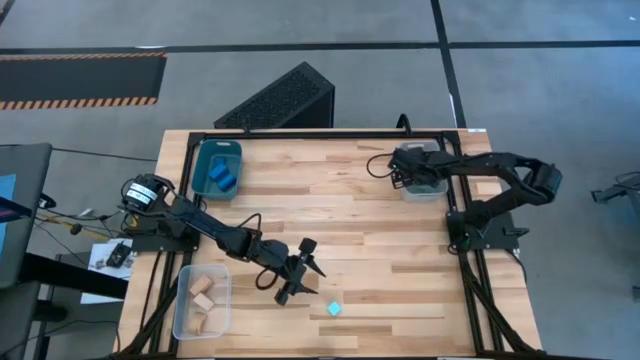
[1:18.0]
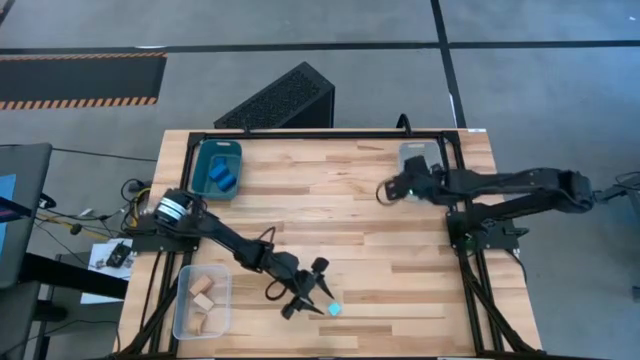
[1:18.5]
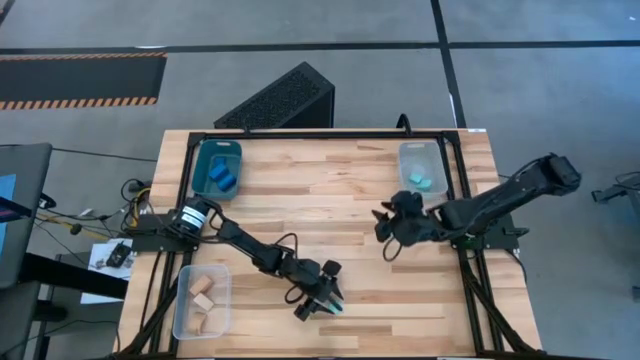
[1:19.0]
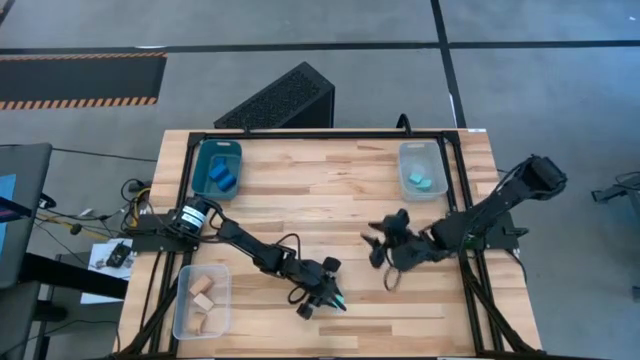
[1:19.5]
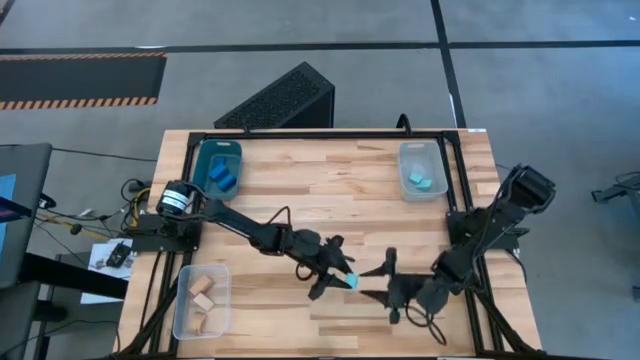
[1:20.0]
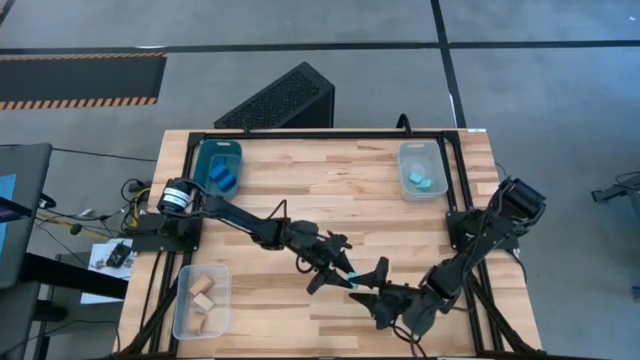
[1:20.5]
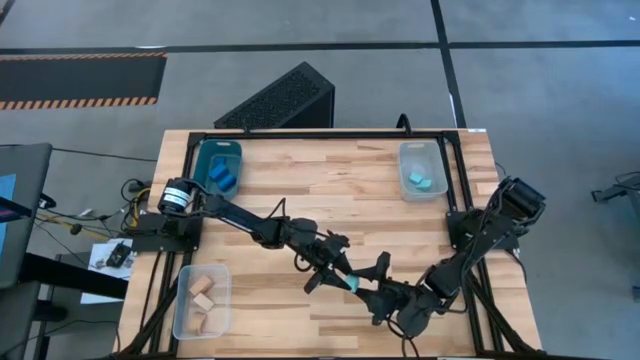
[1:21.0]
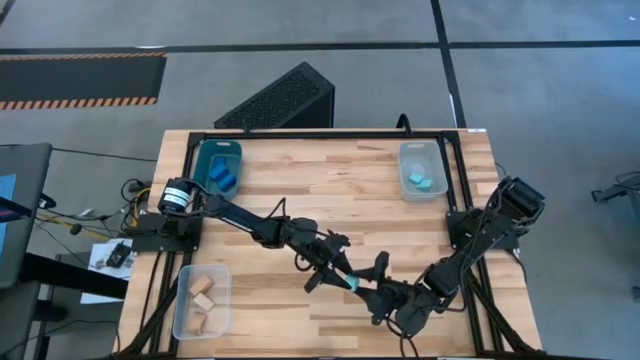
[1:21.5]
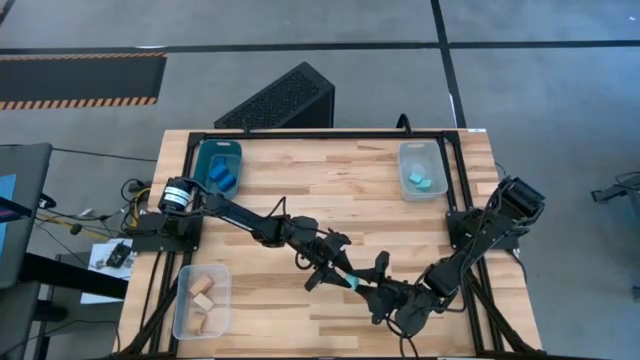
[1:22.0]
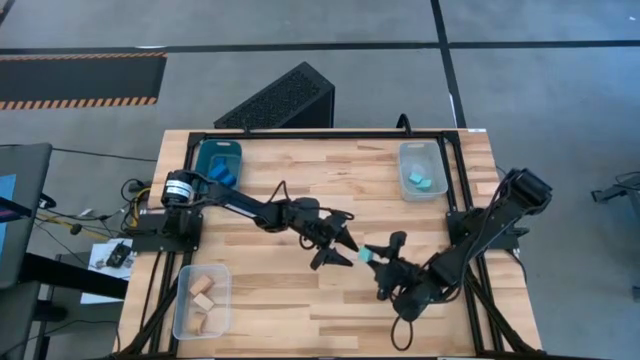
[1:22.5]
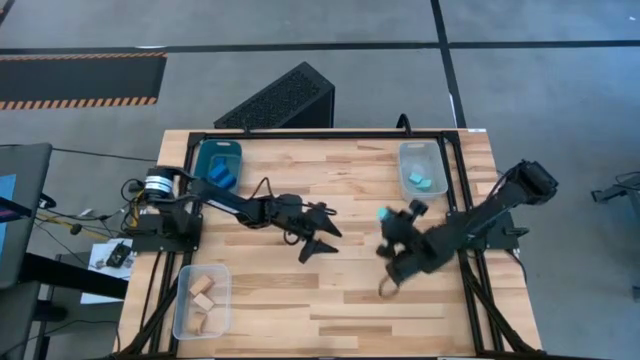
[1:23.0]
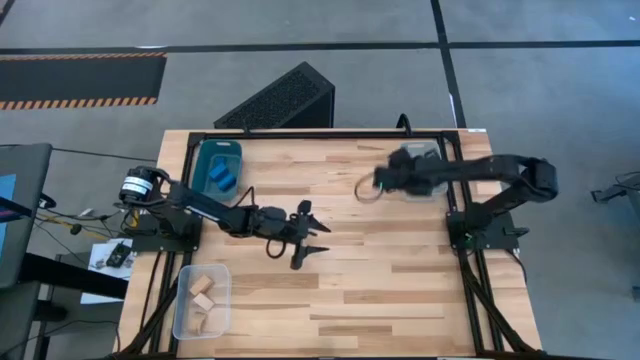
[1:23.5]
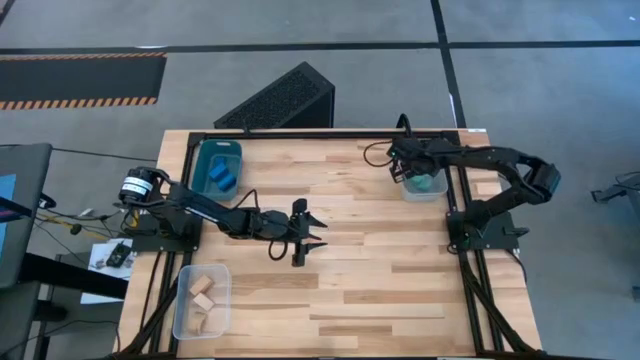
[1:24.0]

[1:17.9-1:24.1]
Task: Sort & place blocks by color
Put the light blue block into the white bin

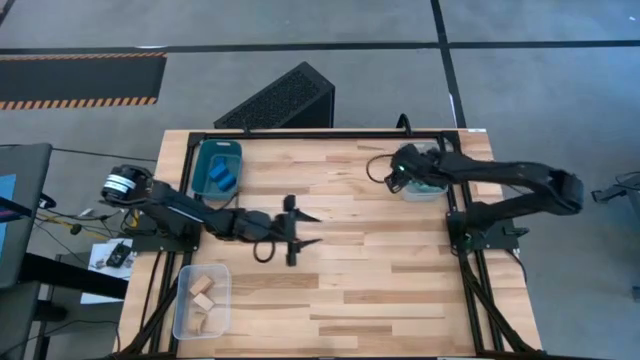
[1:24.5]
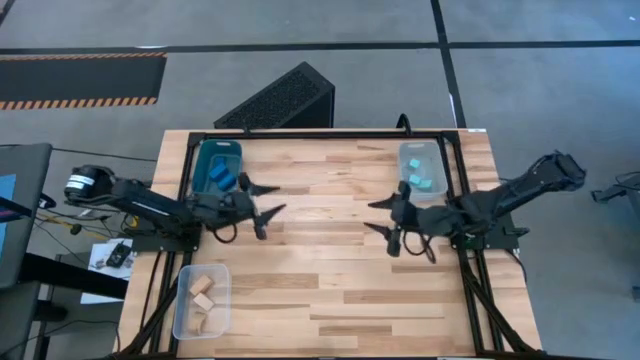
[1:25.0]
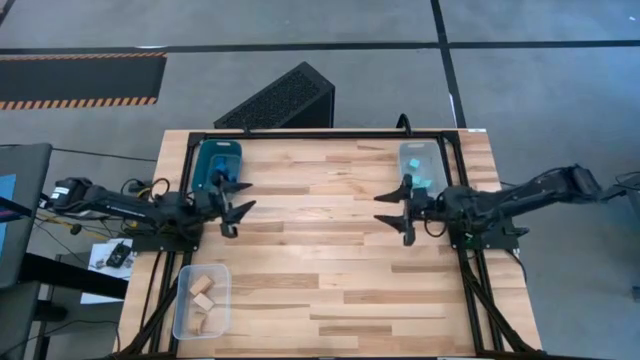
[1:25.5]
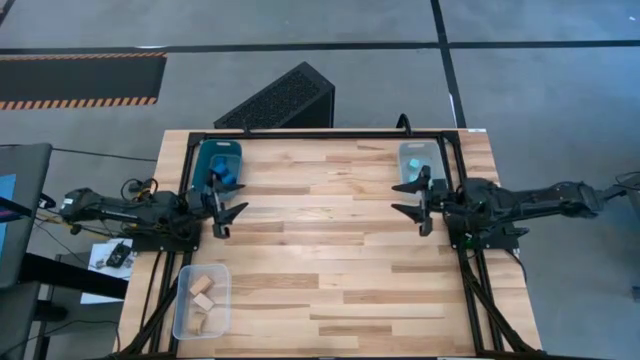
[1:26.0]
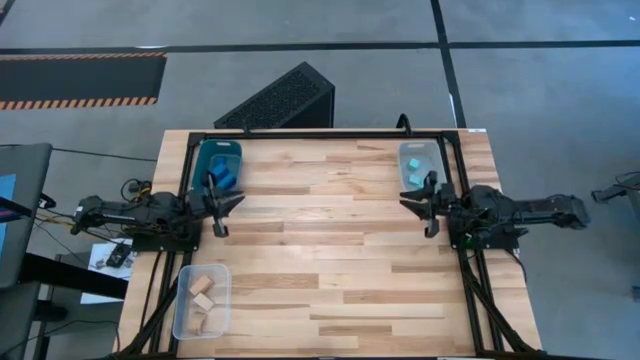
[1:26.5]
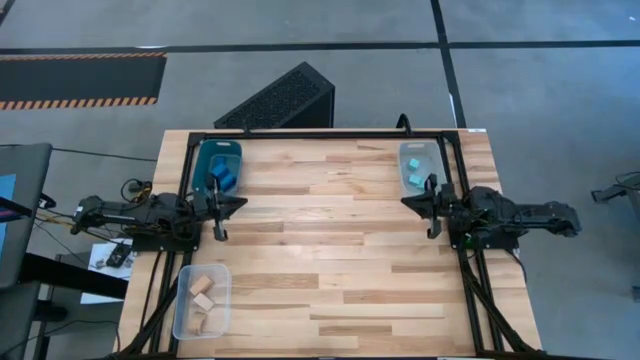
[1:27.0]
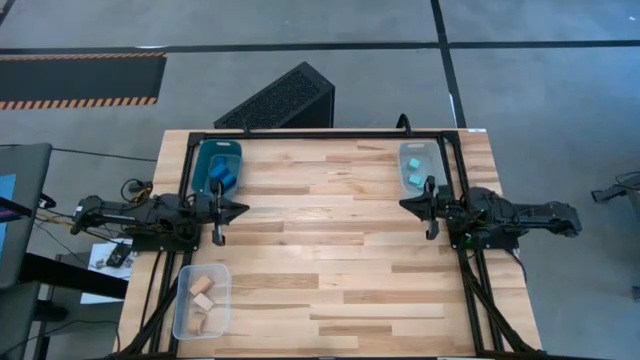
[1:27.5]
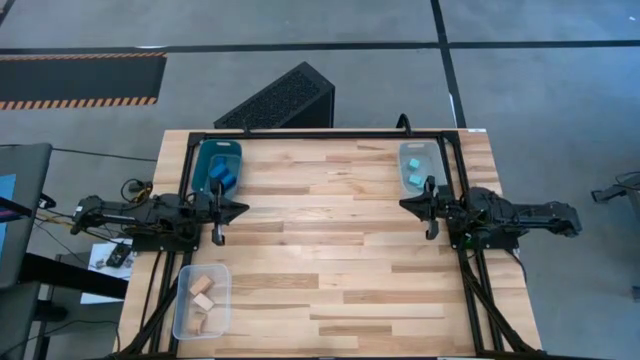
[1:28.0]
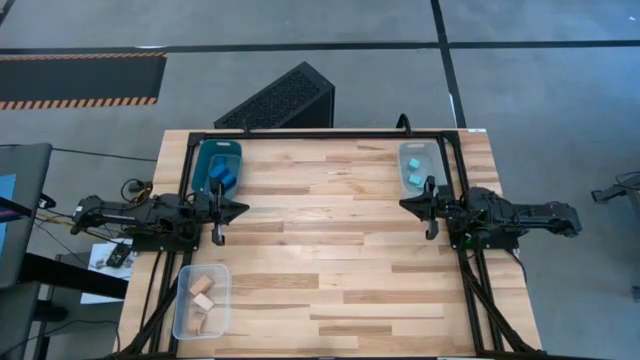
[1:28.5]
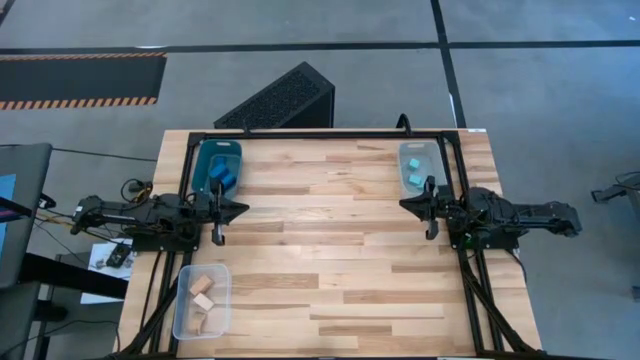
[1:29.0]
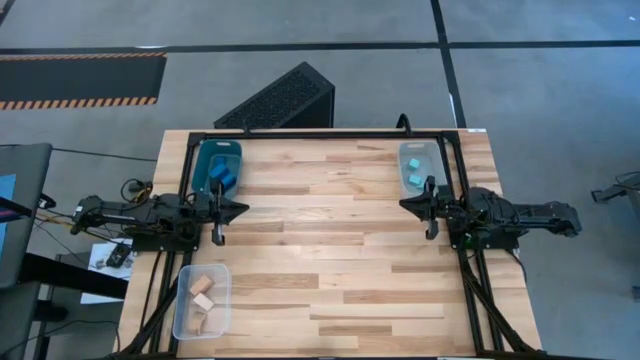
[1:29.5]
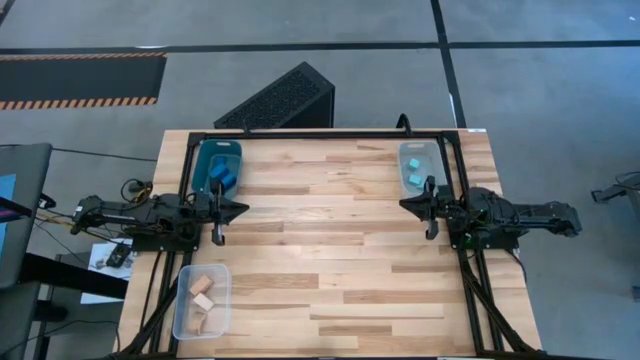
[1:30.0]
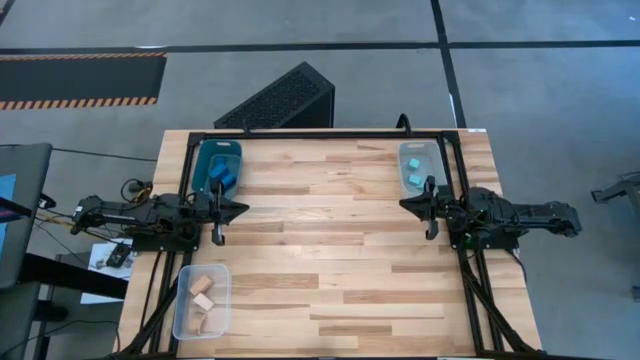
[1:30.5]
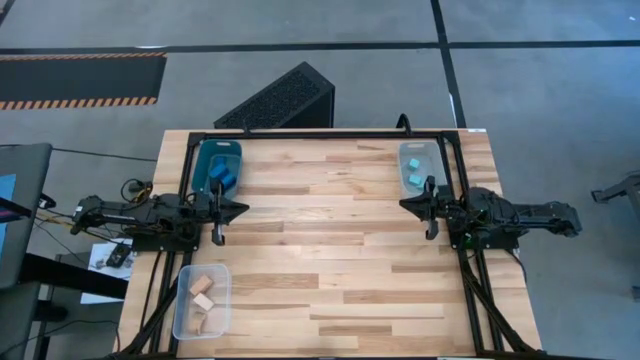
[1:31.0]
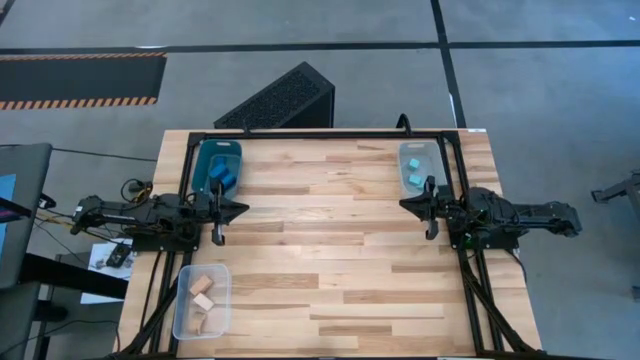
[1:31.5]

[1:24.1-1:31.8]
Return to Home Position

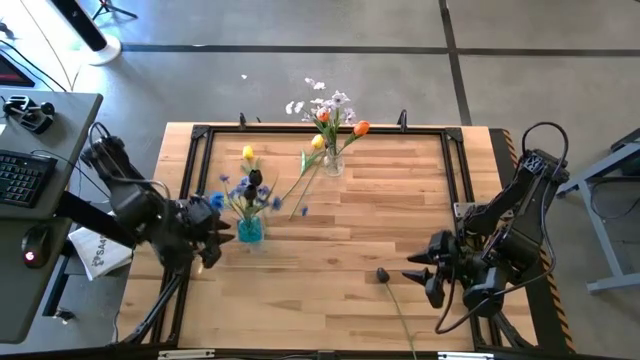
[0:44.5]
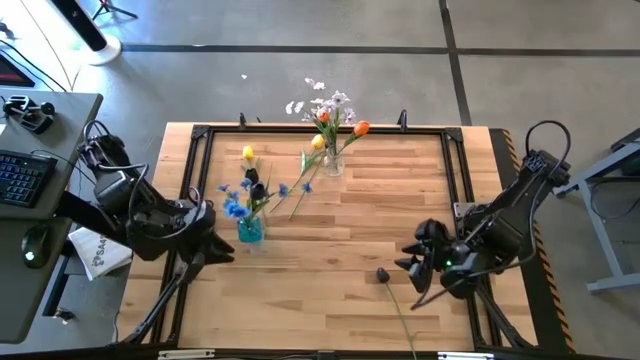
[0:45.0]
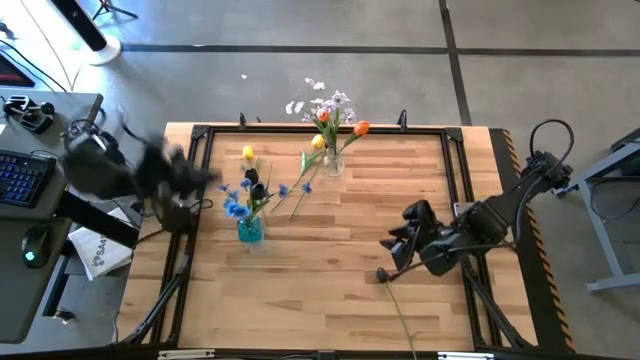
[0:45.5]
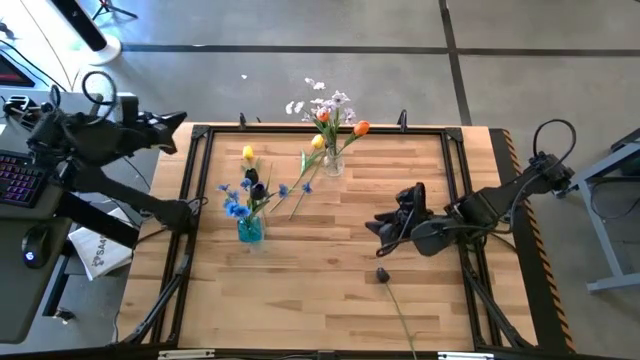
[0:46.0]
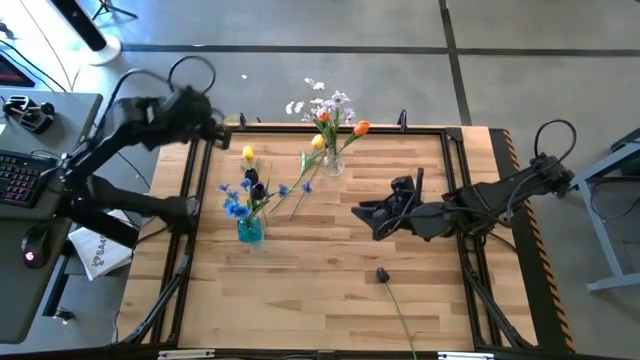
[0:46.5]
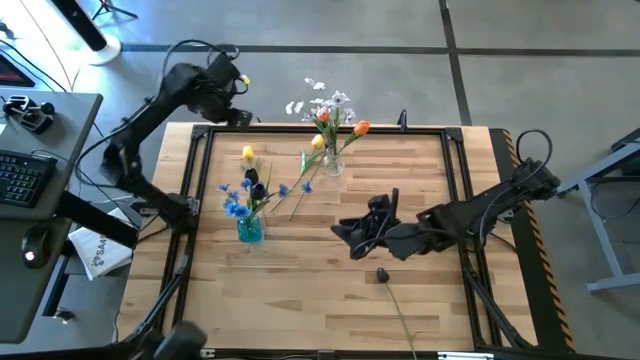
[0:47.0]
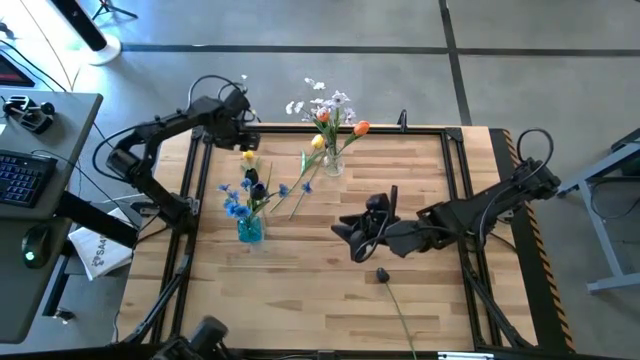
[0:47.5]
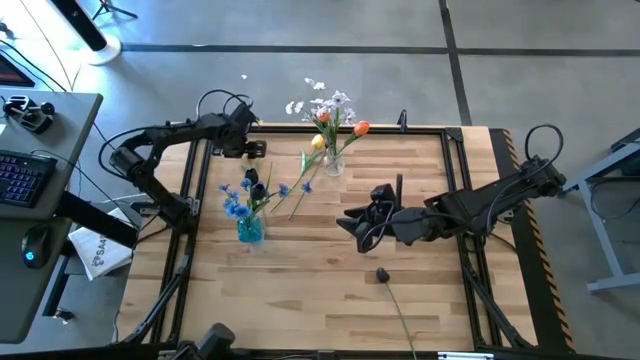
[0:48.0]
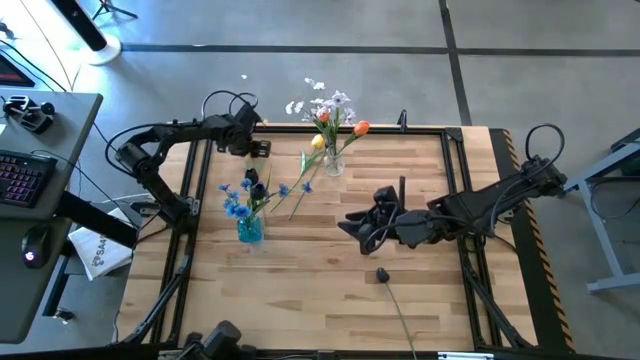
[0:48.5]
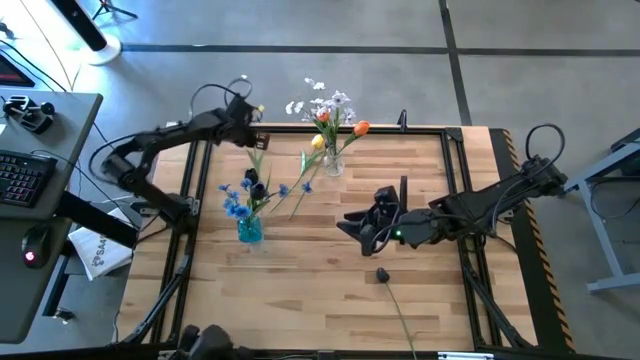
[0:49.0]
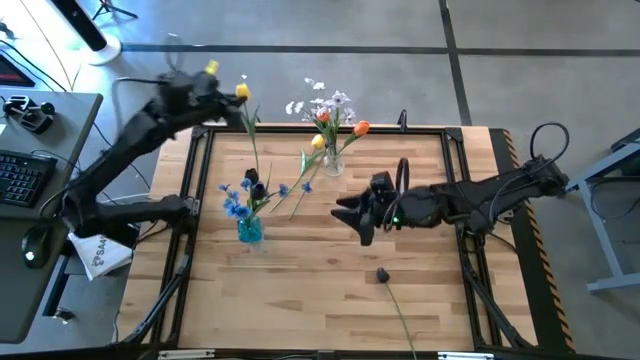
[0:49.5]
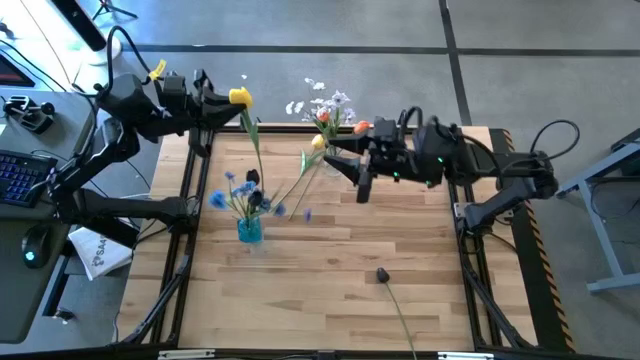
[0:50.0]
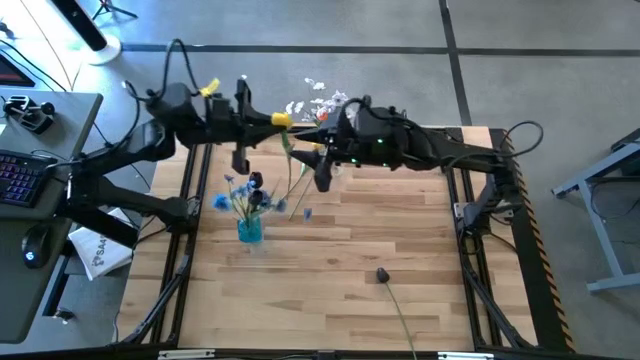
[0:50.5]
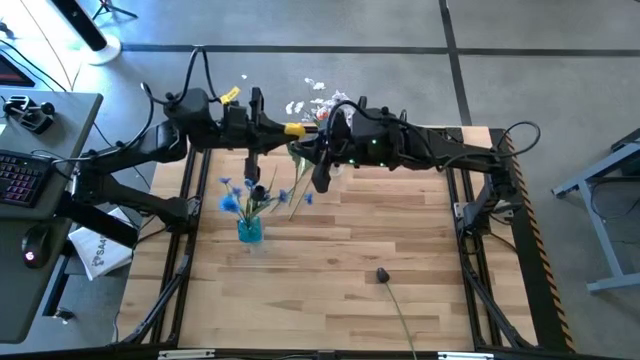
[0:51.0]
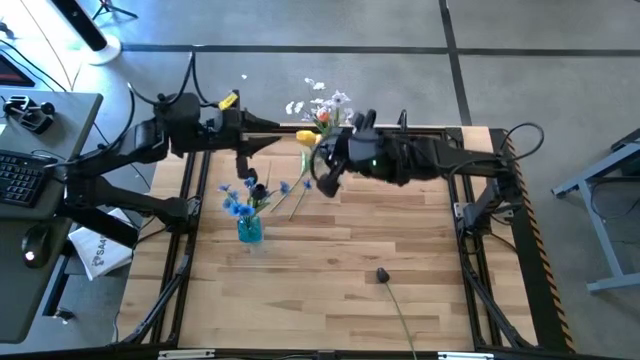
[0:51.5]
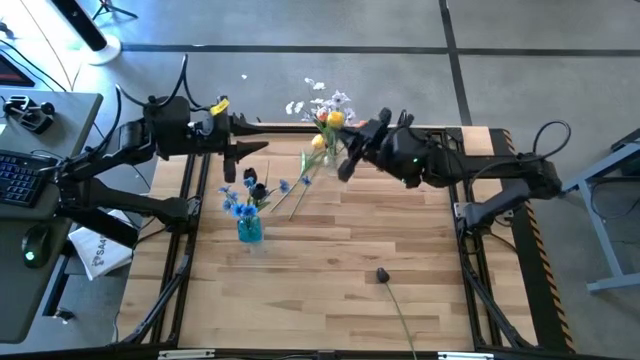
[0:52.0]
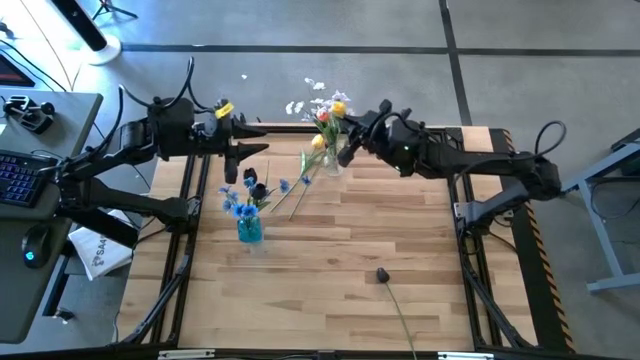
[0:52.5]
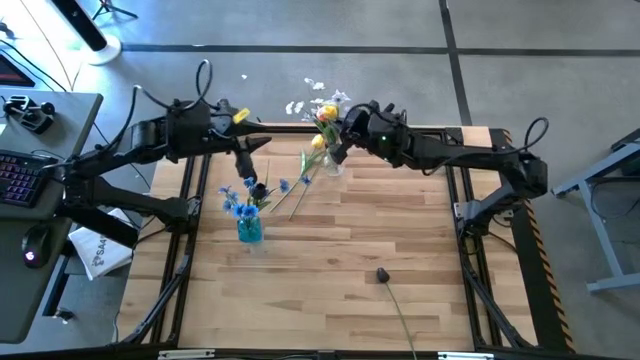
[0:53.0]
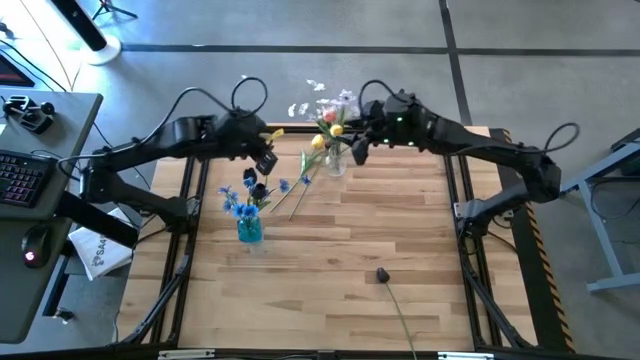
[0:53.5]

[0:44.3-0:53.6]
Task: Sort flowers into vase by color
Put the left yellow flower into the transparent vase
